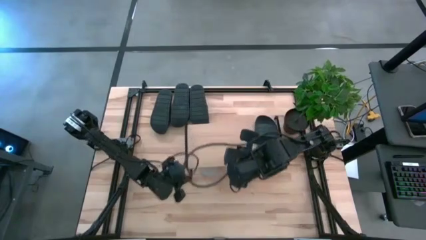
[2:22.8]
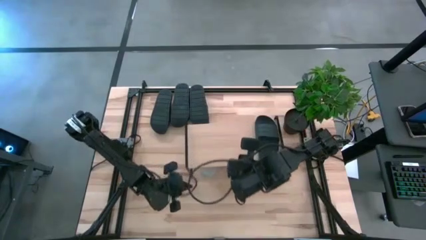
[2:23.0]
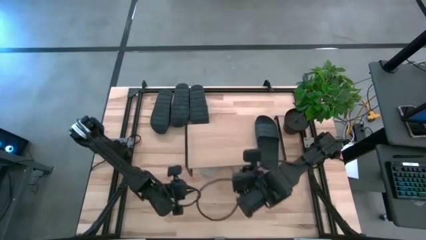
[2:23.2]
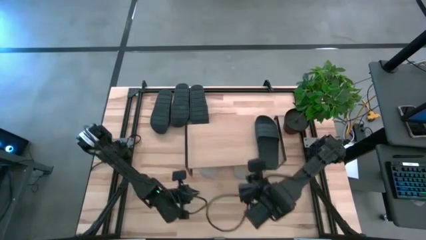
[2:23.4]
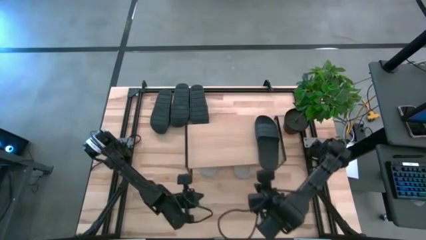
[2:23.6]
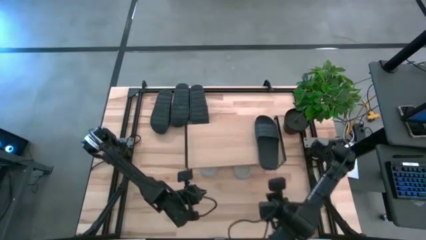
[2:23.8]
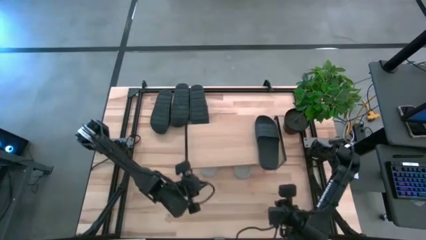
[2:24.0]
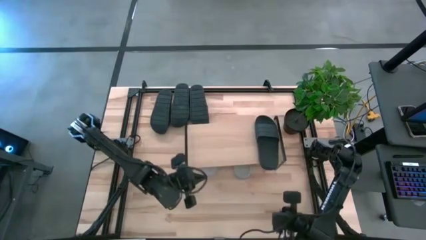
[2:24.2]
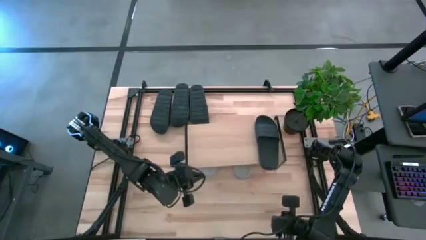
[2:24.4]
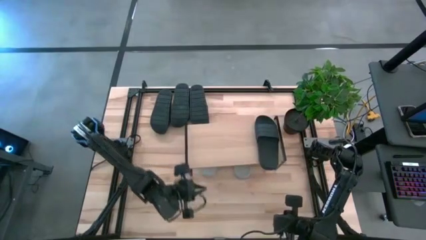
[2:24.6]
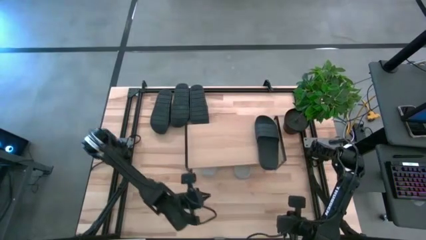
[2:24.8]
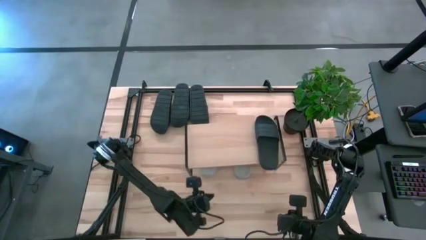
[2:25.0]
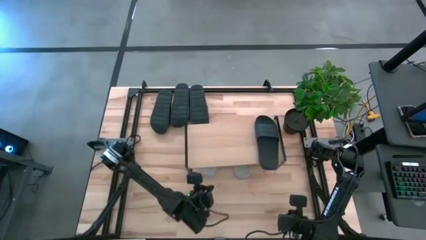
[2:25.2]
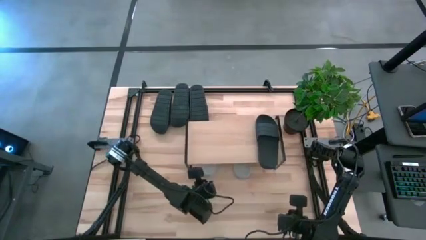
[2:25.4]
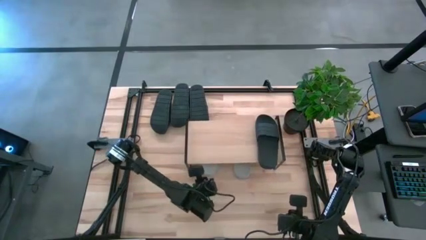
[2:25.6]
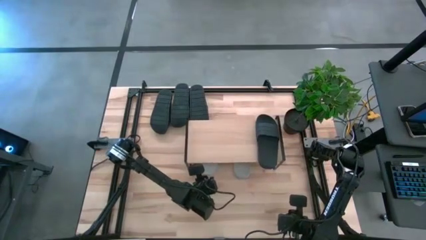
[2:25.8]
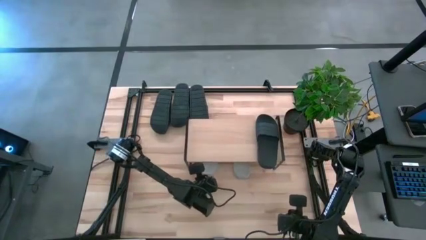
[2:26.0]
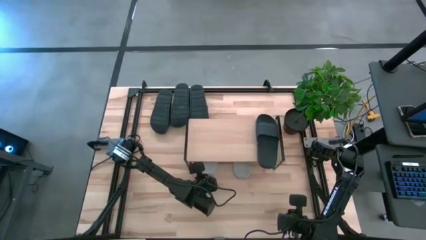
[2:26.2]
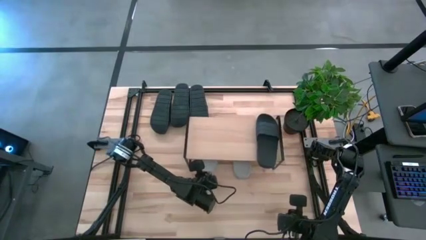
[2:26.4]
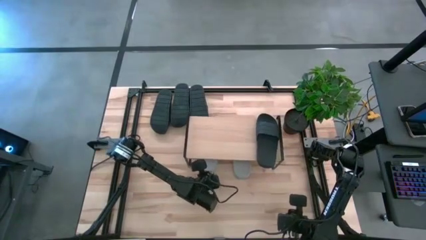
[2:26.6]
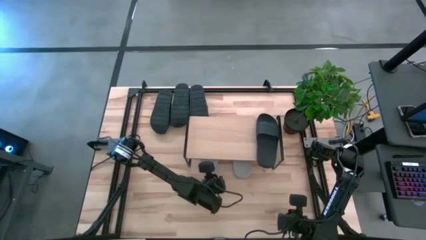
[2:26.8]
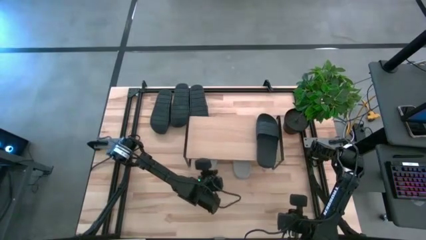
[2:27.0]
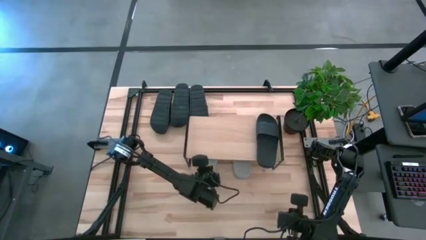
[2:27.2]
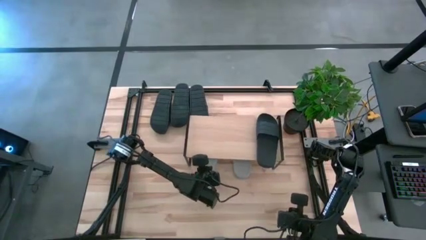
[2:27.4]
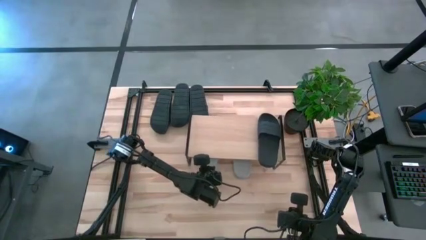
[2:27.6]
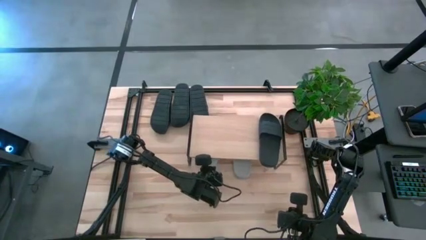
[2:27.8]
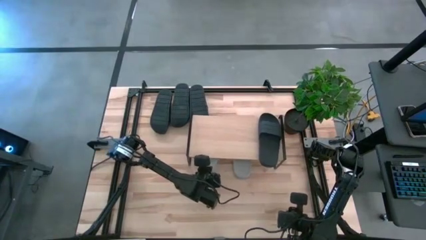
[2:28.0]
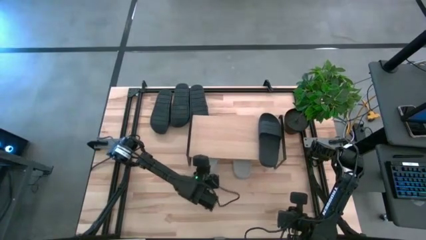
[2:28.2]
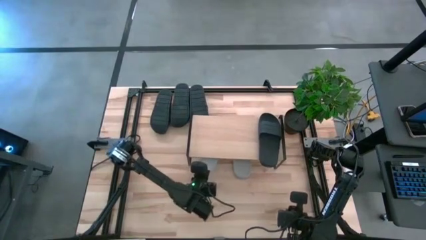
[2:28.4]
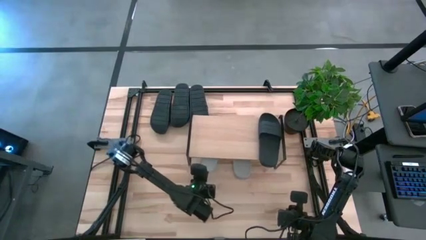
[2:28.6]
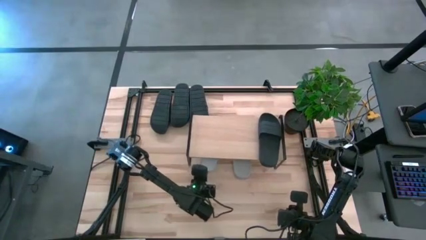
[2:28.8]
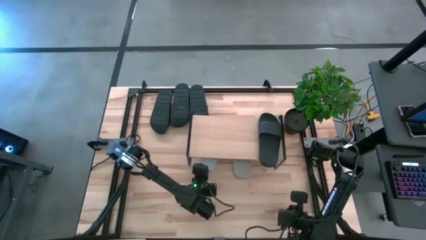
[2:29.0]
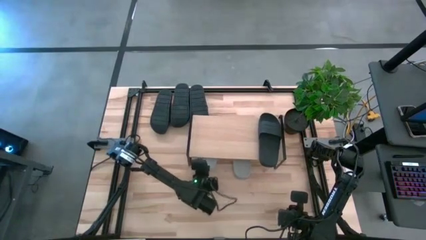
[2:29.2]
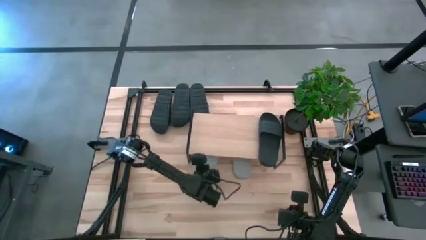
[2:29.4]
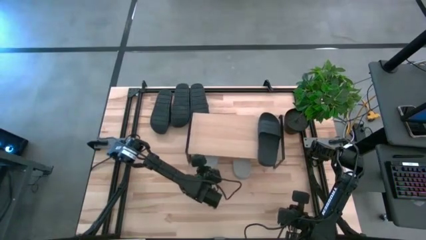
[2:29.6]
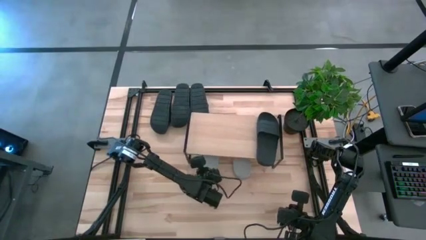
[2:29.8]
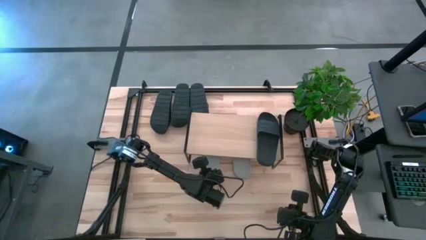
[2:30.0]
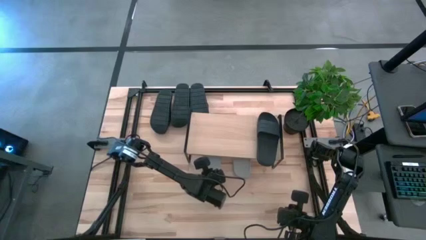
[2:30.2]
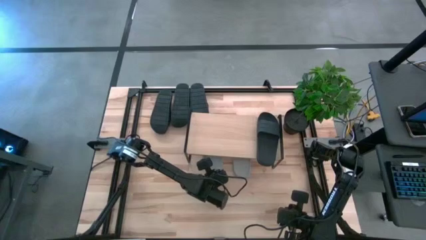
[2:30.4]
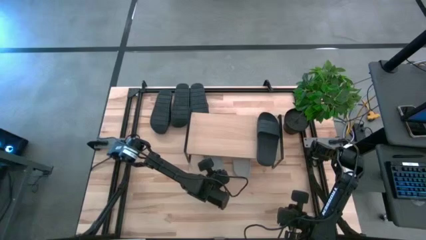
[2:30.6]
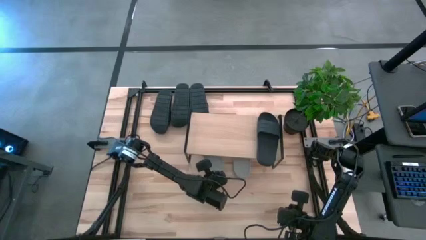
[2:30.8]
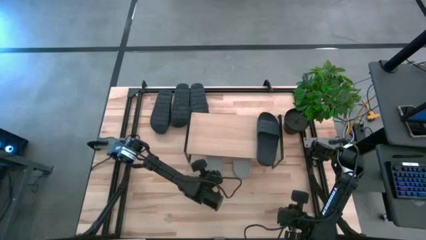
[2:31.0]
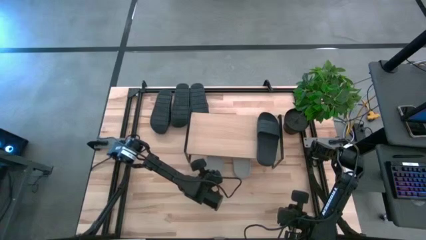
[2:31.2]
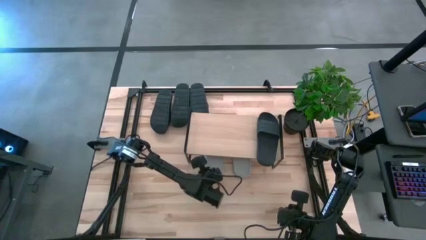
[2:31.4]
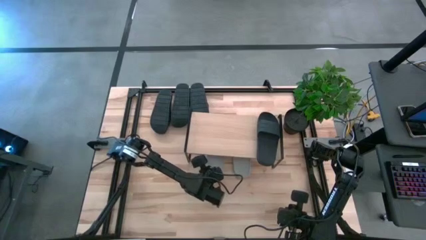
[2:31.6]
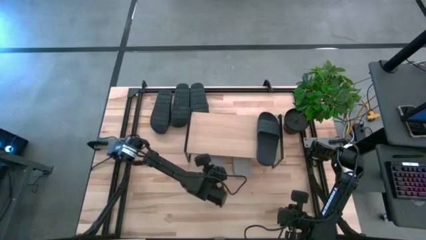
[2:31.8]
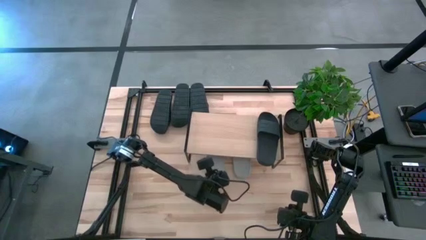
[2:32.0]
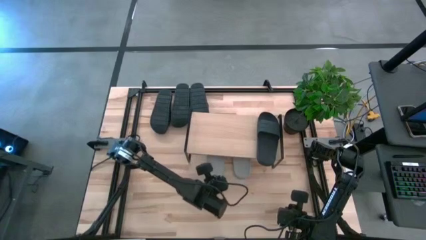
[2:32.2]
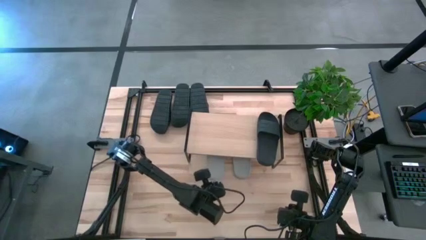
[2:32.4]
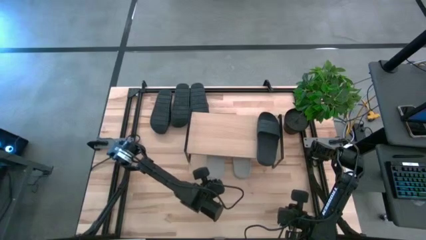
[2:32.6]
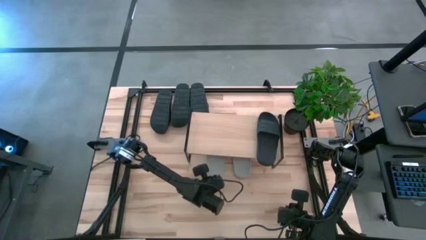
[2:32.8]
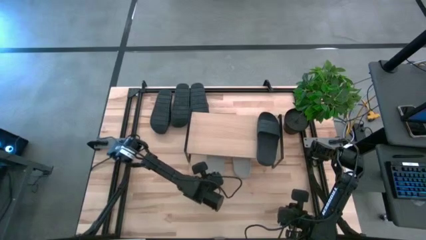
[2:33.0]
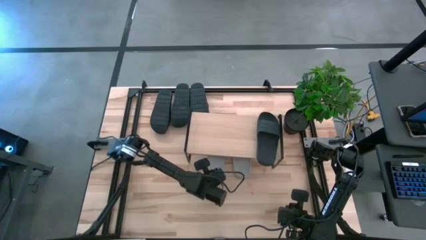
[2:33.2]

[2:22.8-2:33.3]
Task: Pick and place slides into the shelf
Adjust the gray slipper under the shelf

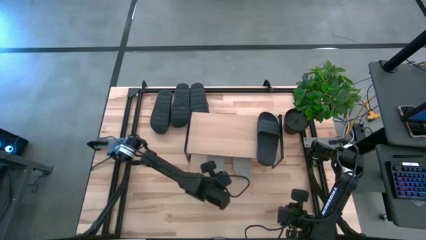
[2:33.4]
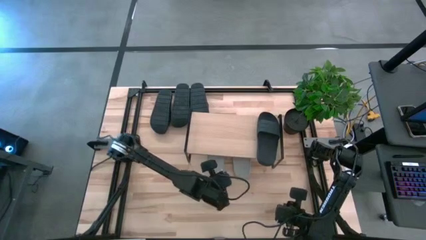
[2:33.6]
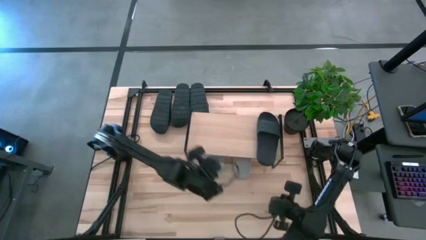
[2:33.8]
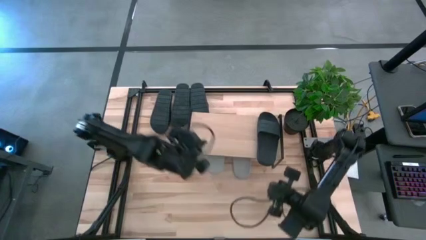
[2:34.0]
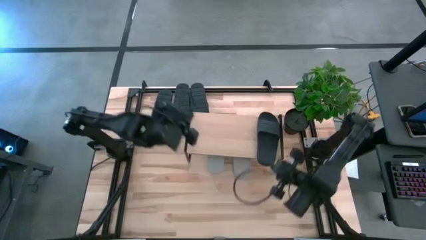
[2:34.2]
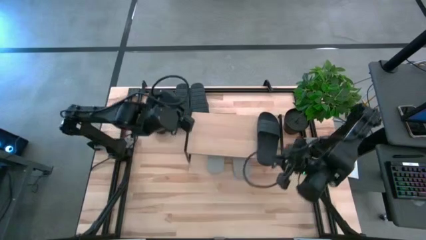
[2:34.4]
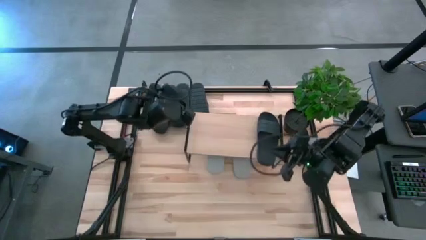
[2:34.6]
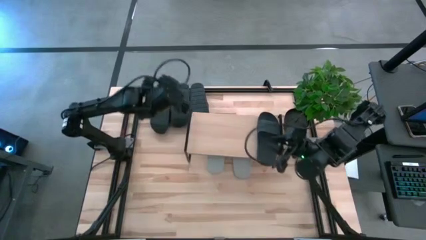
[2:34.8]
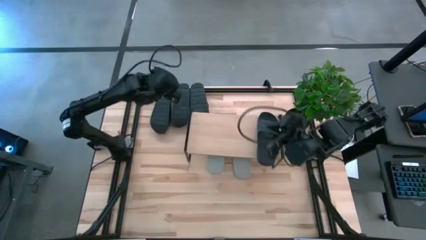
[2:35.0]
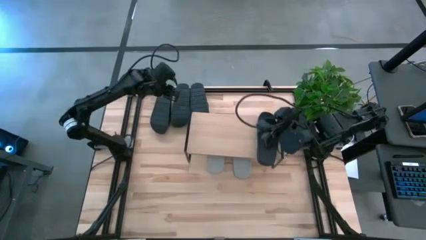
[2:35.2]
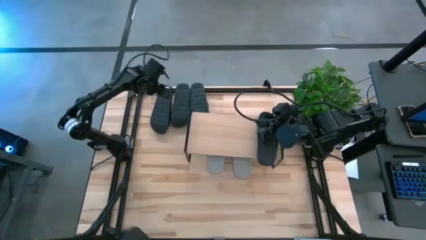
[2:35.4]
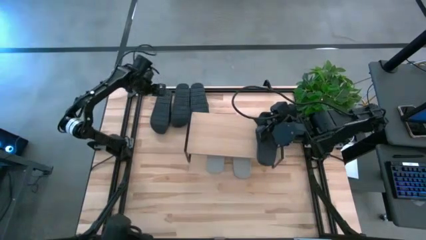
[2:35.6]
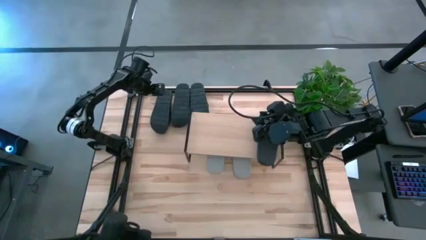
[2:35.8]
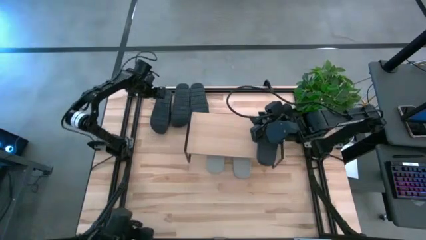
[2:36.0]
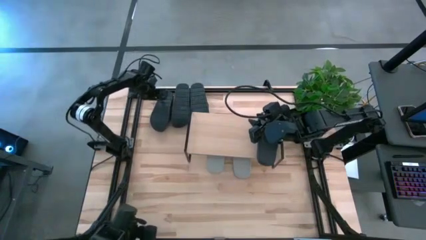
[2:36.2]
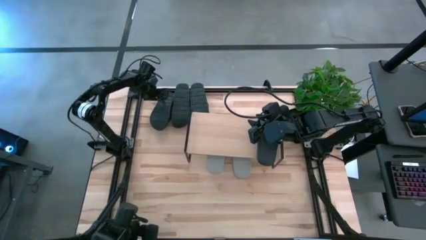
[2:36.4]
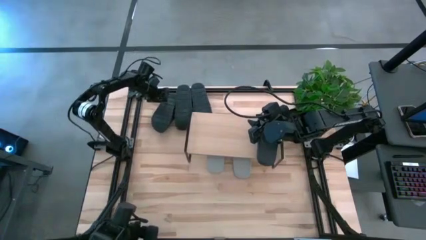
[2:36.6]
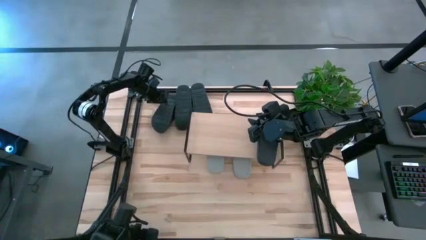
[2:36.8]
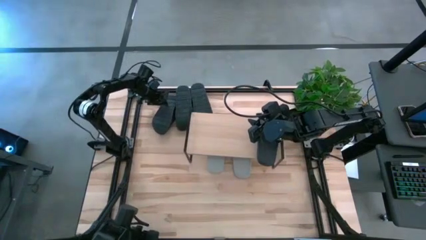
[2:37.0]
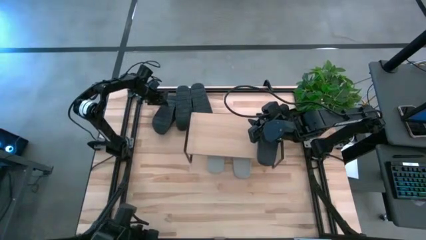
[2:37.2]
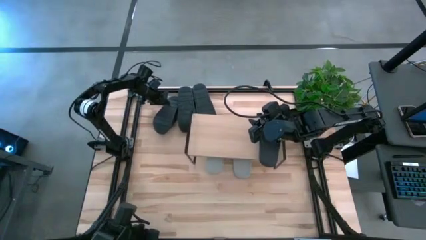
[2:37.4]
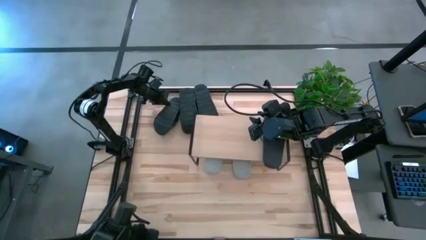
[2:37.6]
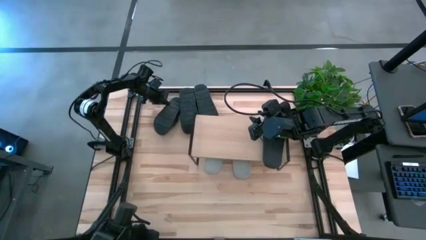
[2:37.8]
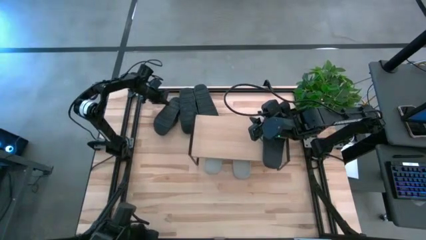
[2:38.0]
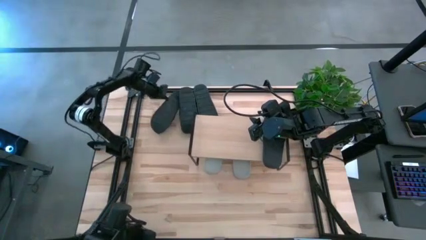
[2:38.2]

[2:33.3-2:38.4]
Put the black slipper on the shelf
